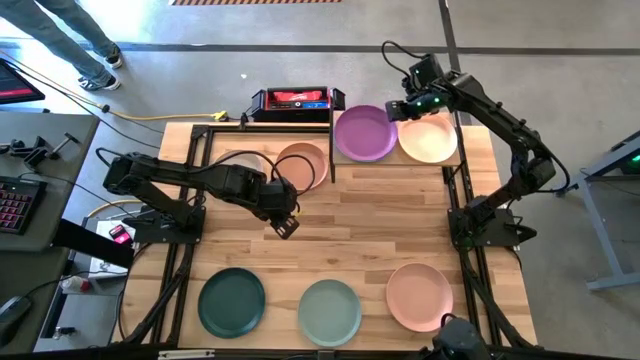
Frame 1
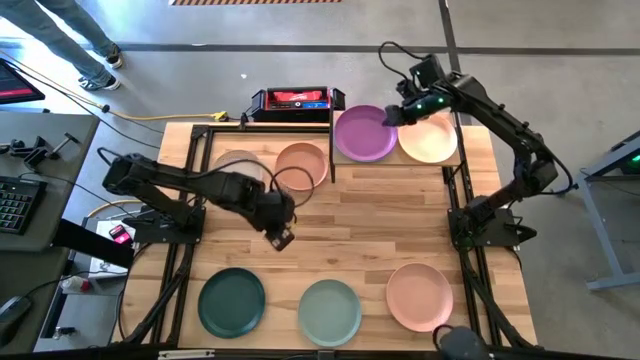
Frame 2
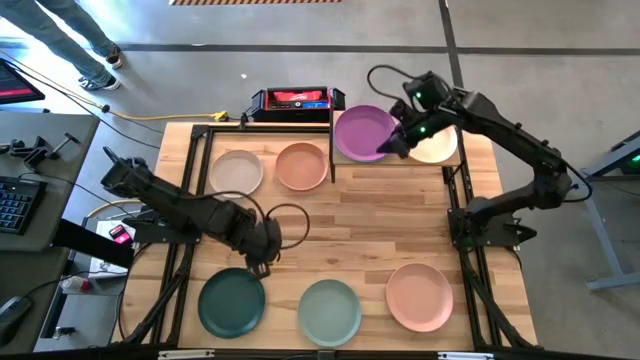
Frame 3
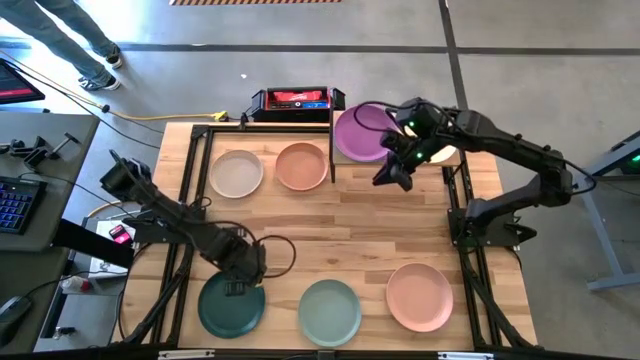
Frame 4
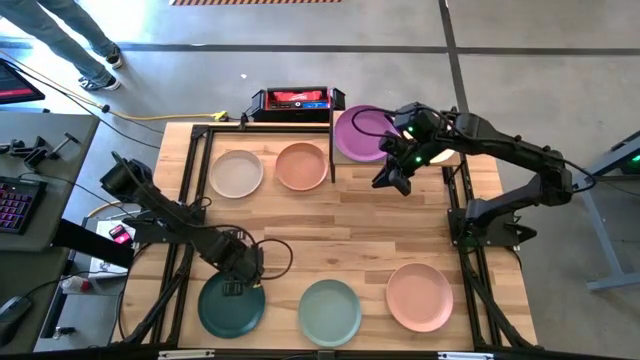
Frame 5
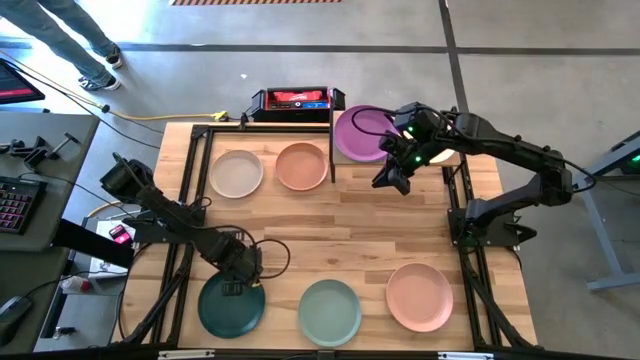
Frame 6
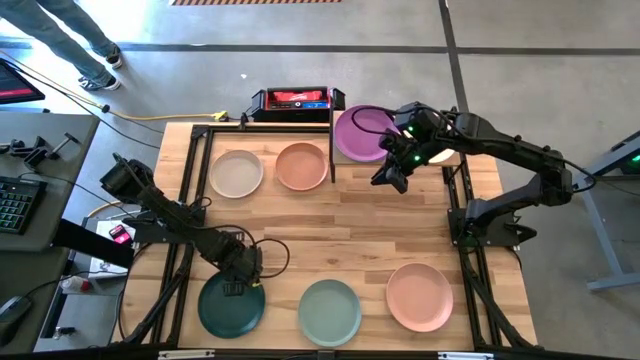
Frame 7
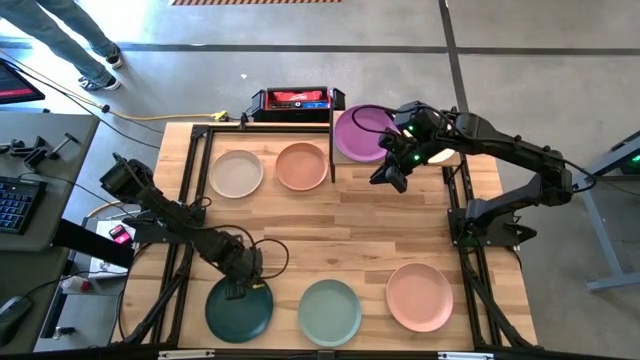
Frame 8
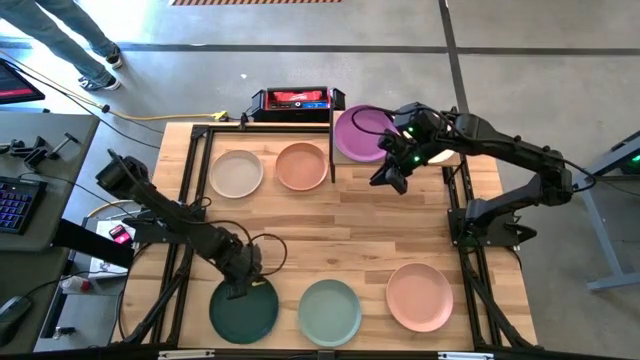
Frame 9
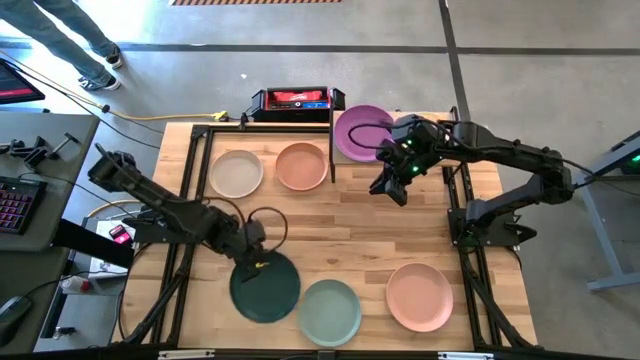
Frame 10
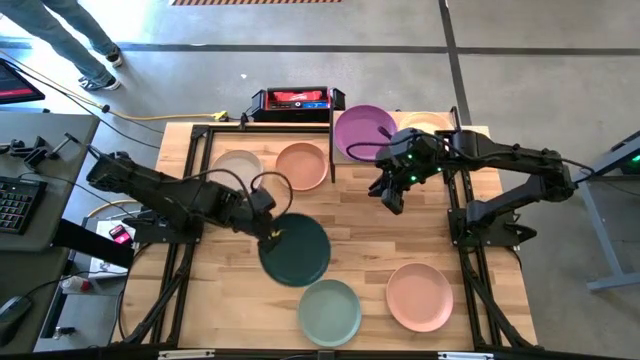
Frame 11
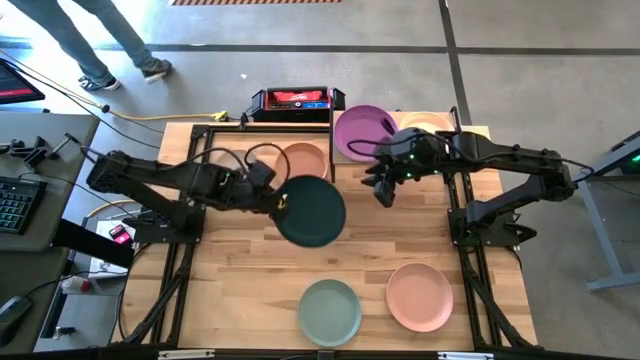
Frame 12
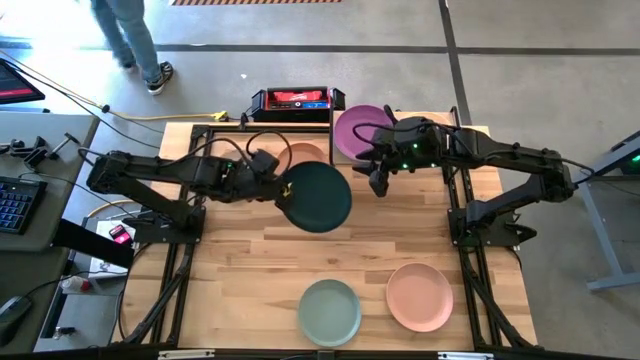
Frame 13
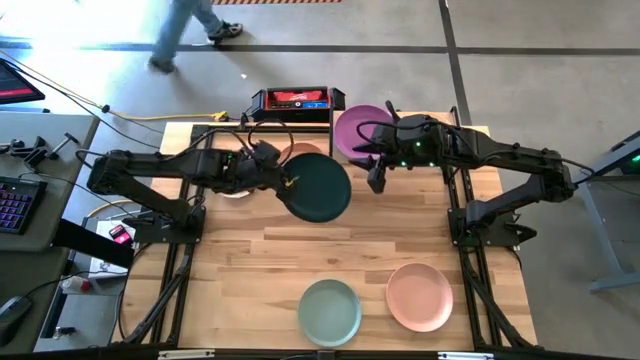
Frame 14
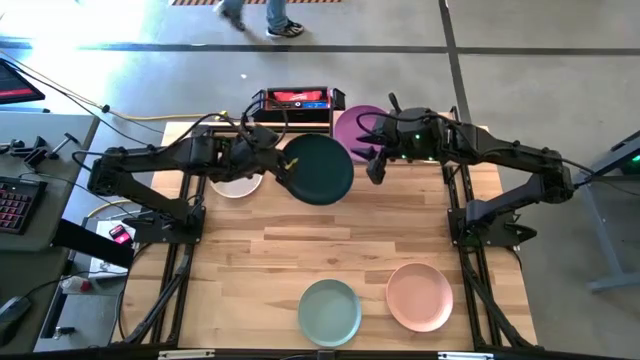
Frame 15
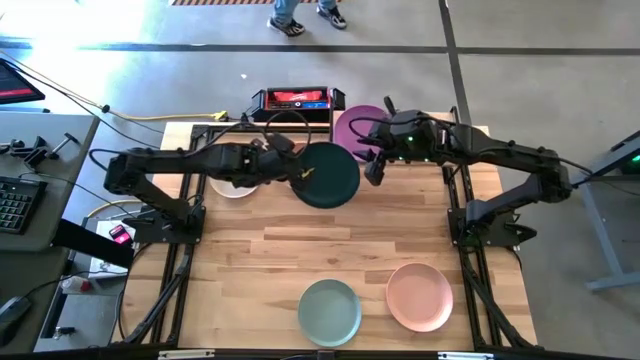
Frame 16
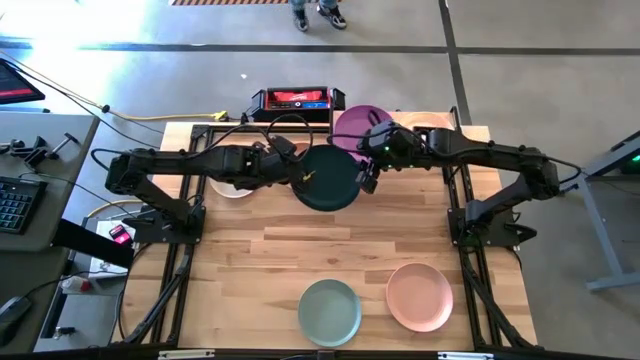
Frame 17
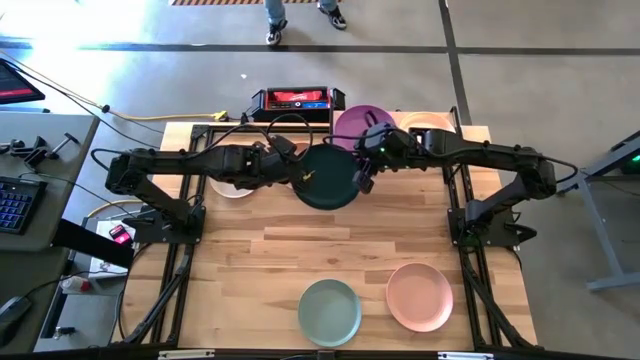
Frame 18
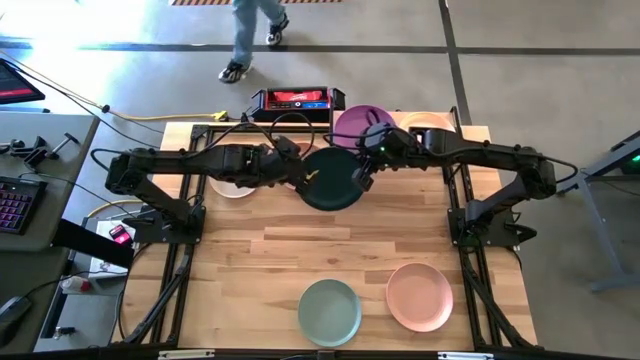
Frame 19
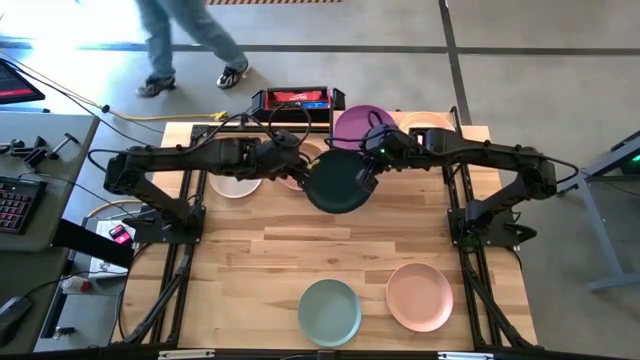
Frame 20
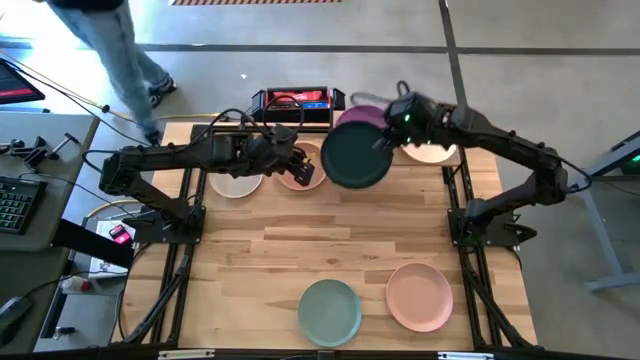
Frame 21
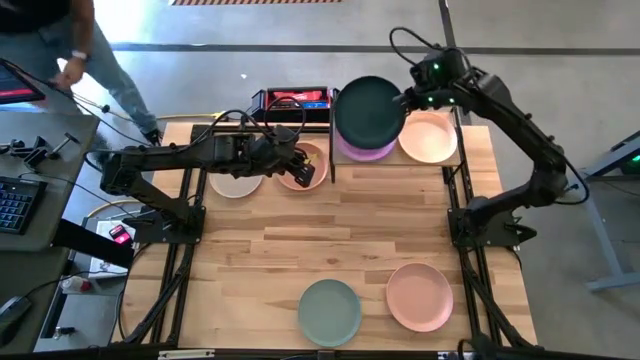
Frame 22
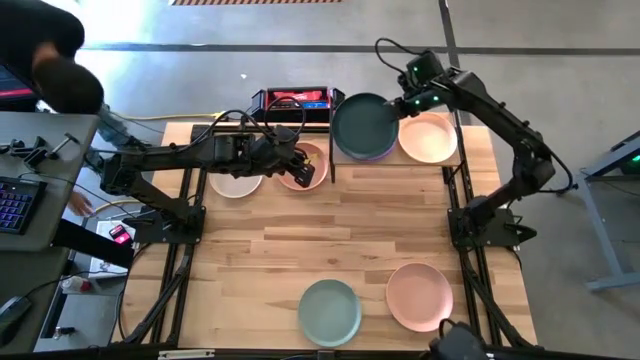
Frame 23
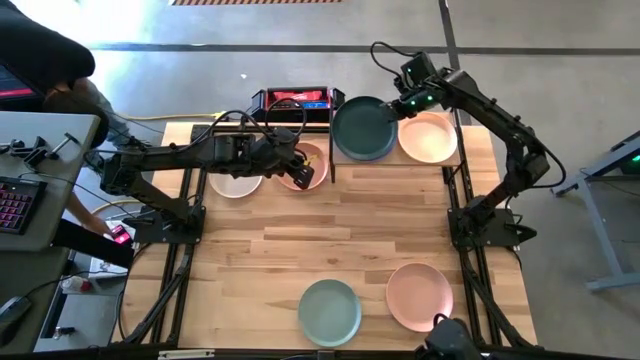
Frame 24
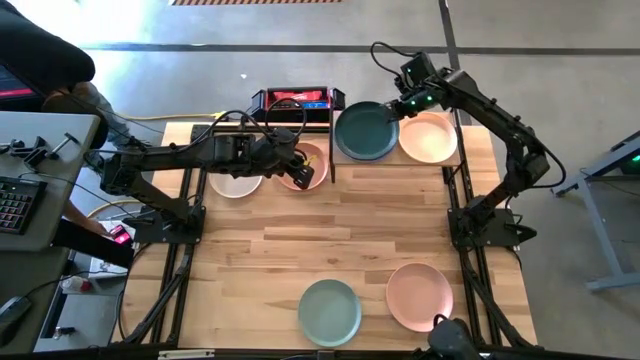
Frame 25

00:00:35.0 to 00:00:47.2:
Task: Place and stack plates onto a shelf
Stack the dark green plate on top of the purple plate on the shelf

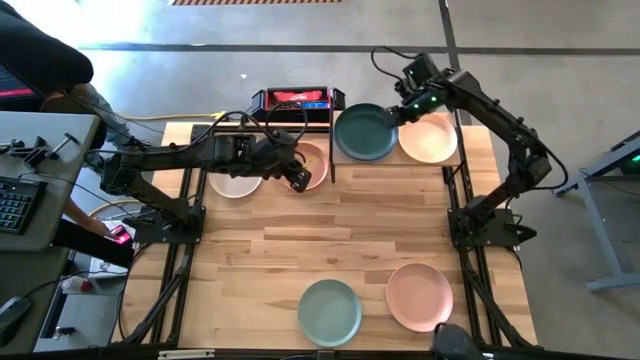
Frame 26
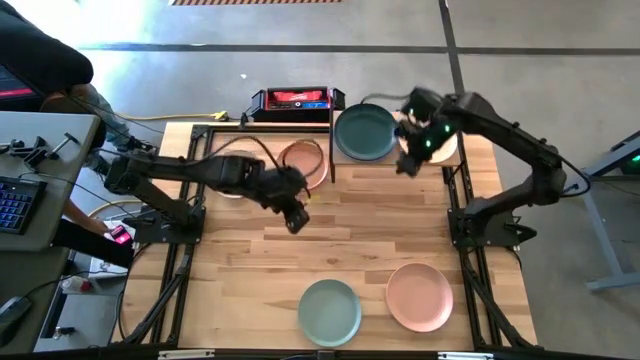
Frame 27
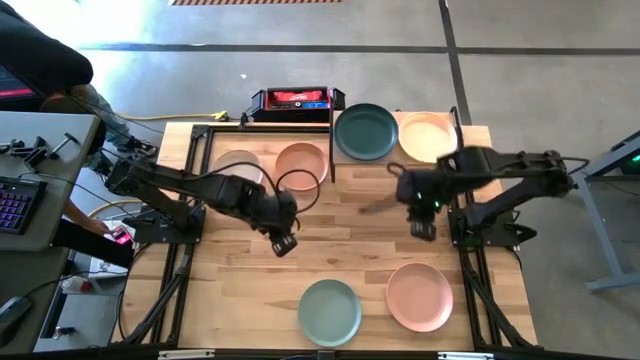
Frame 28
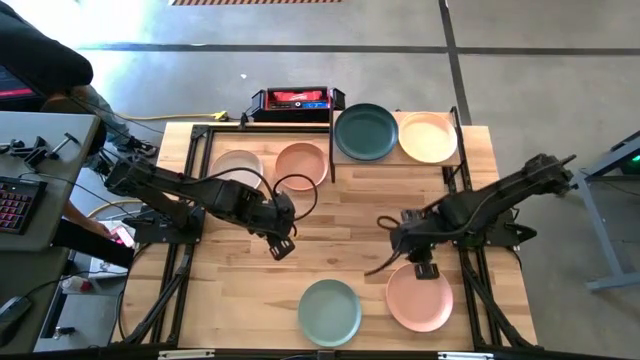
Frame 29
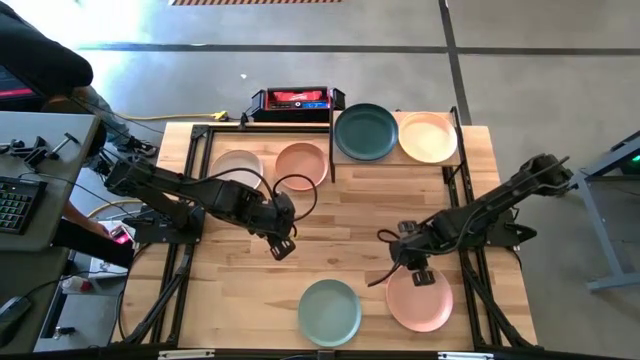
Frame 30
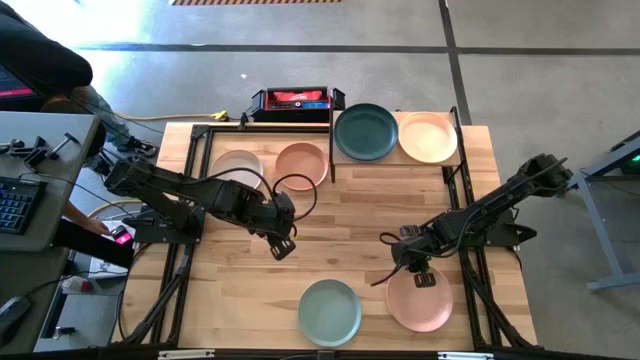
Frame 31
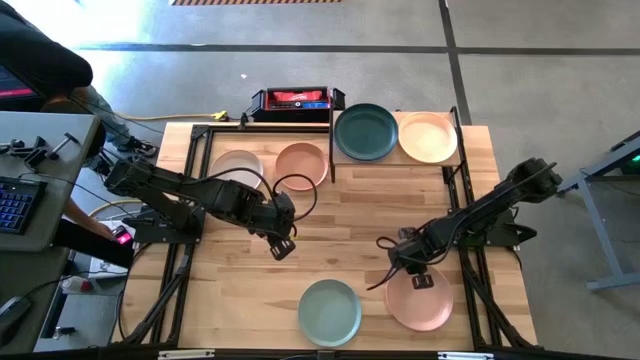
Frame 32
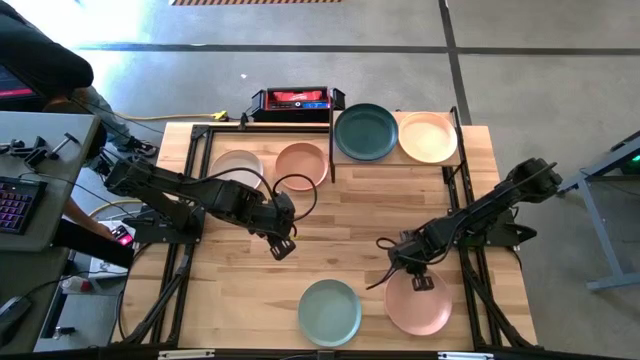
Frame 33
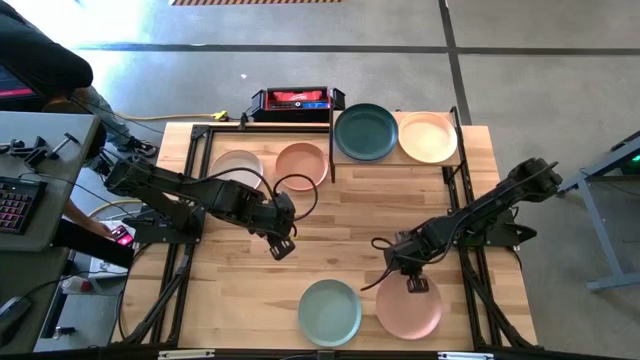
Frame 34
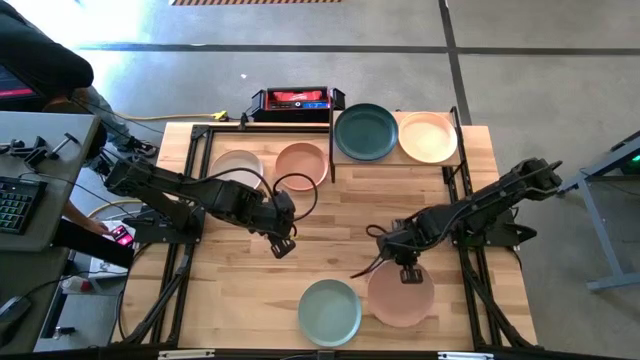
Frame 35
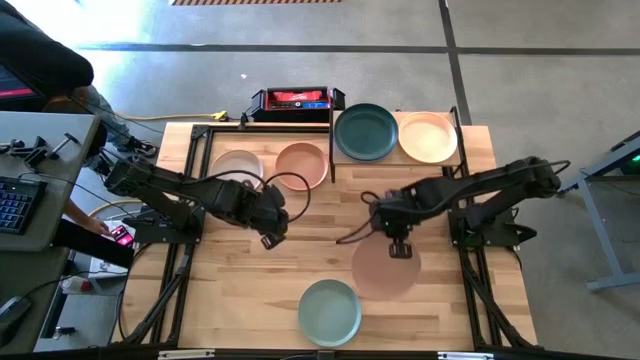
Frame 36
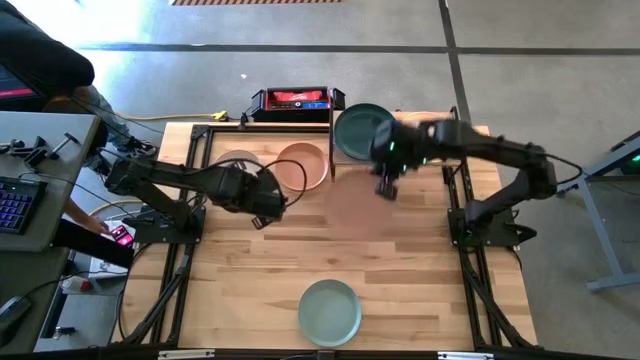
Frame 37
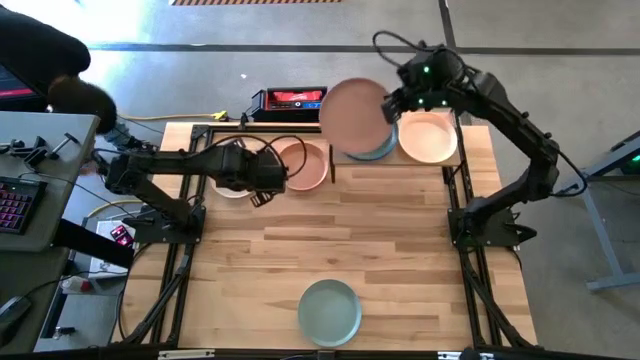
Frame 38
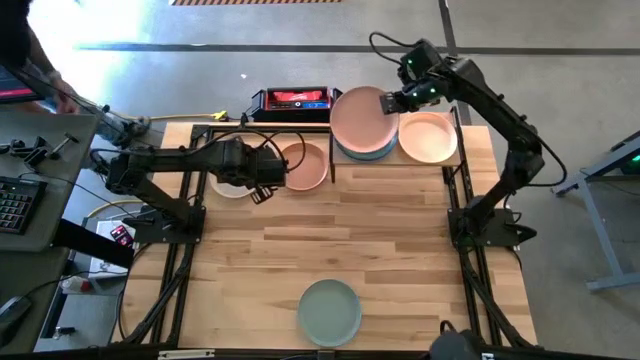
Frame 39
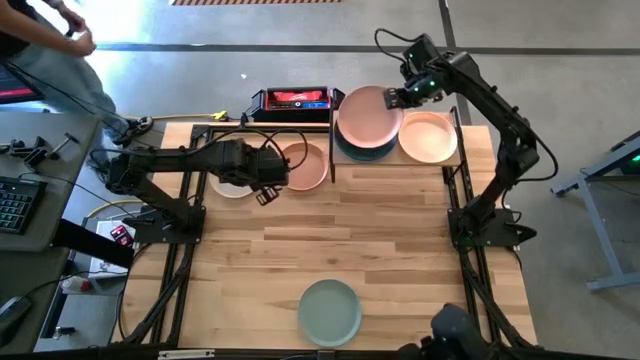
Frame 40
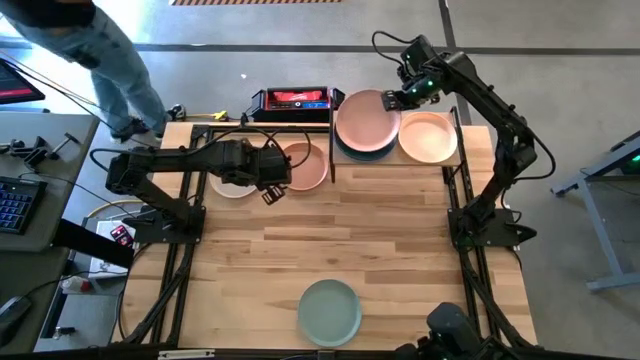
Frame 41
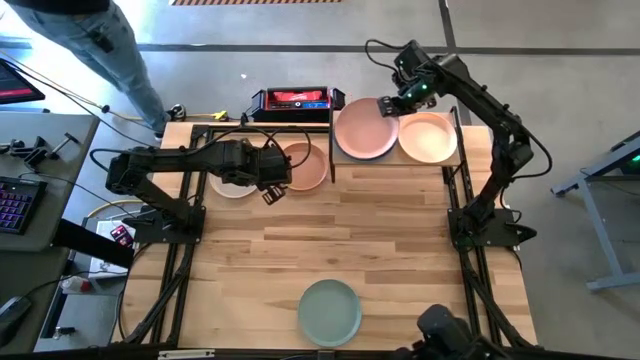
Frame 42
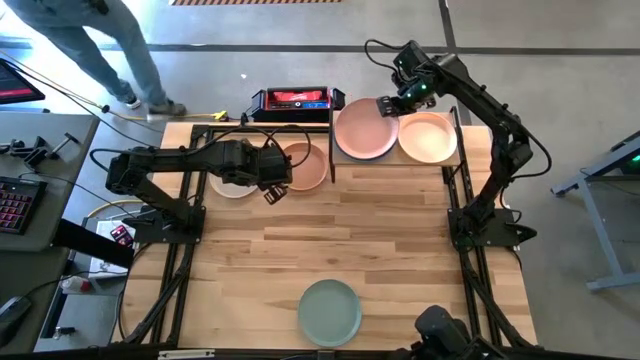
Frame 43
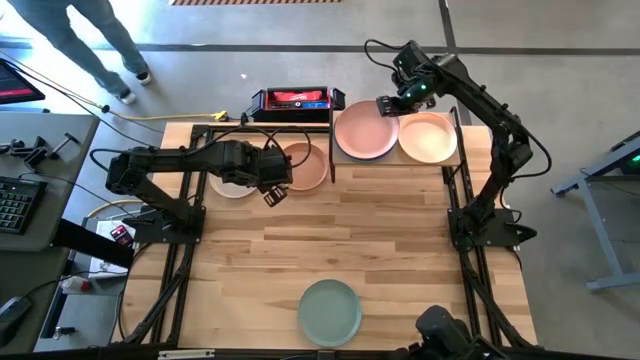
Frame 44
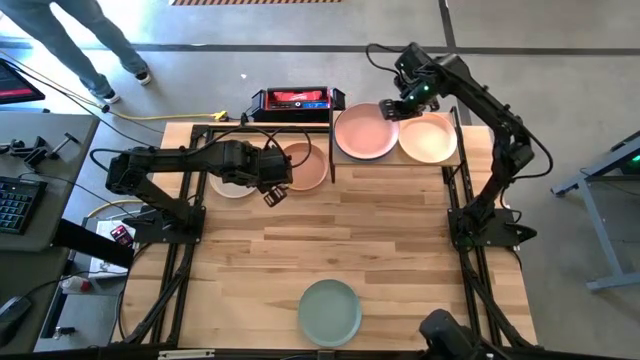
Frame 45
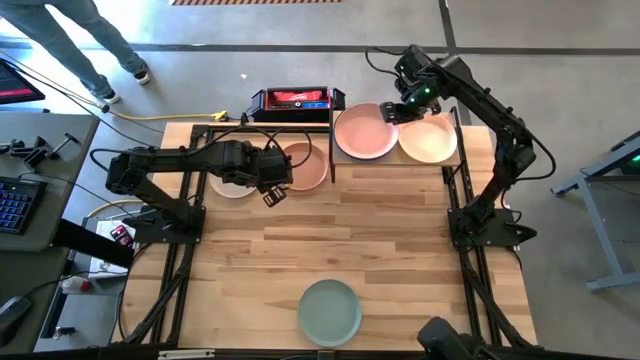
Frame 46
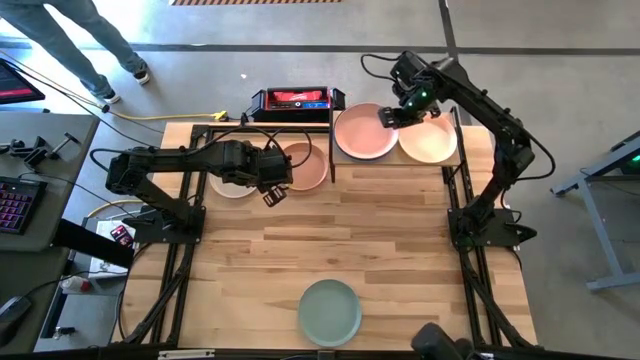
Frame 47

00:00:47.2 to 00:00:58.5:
Stack the brown plate on top of the dark green plate on the shelf
